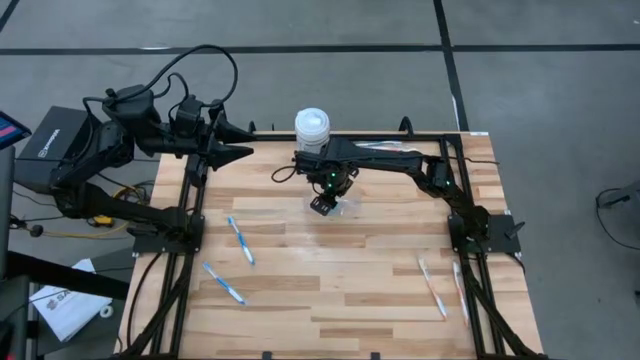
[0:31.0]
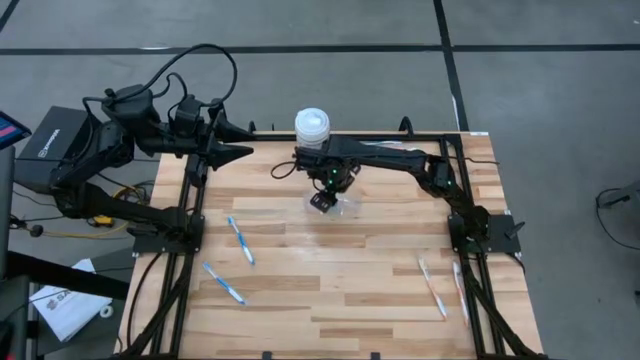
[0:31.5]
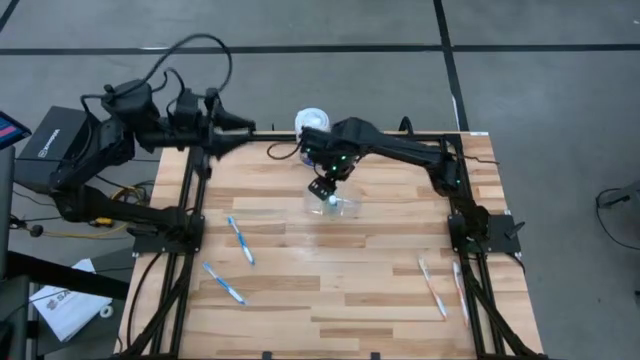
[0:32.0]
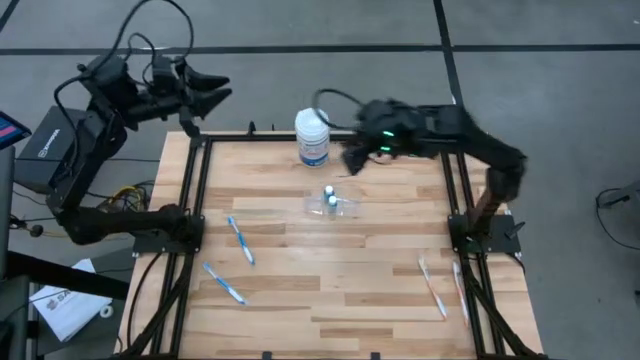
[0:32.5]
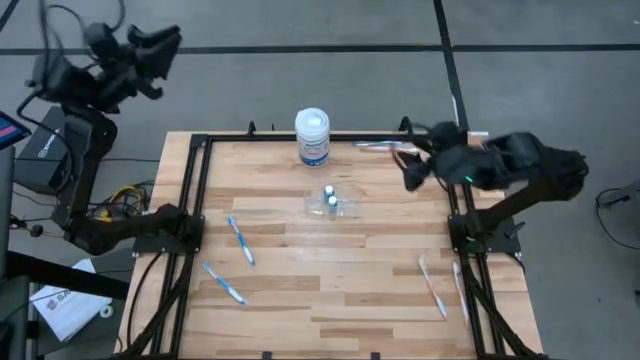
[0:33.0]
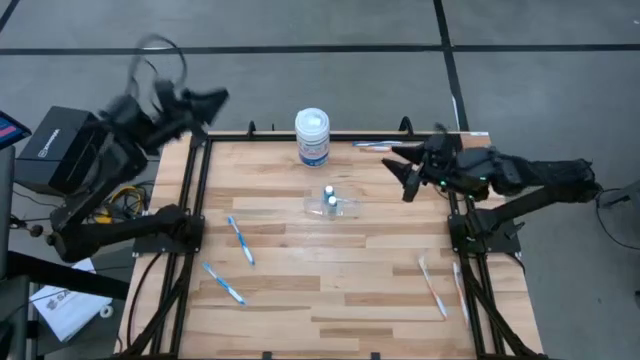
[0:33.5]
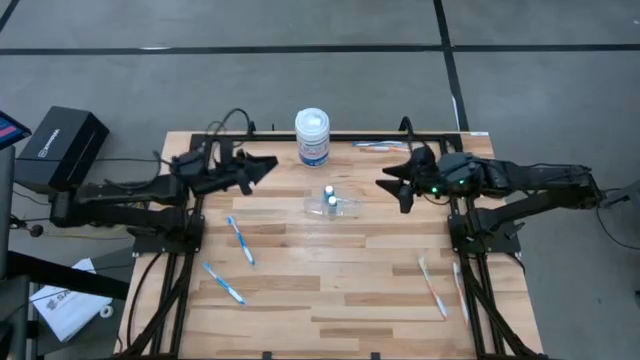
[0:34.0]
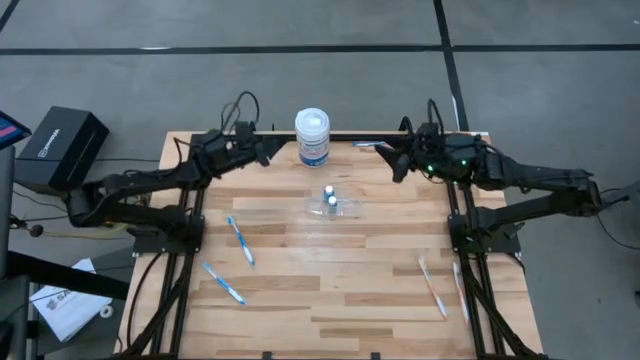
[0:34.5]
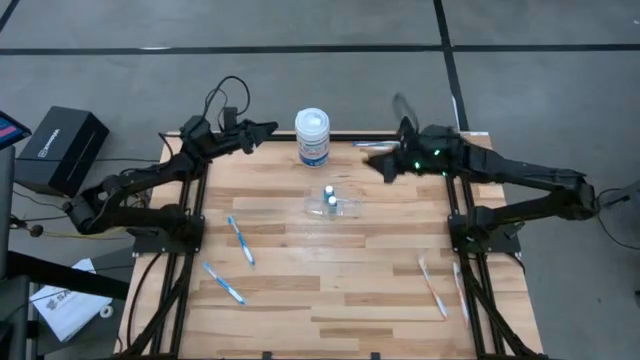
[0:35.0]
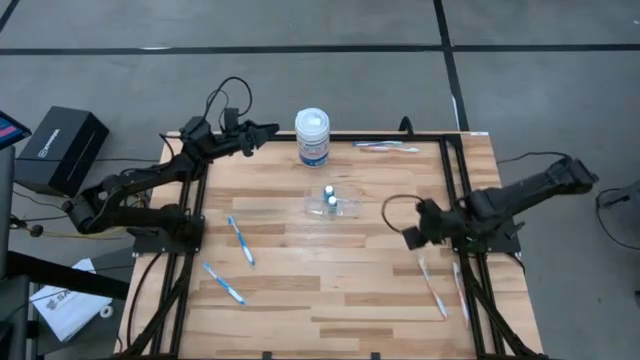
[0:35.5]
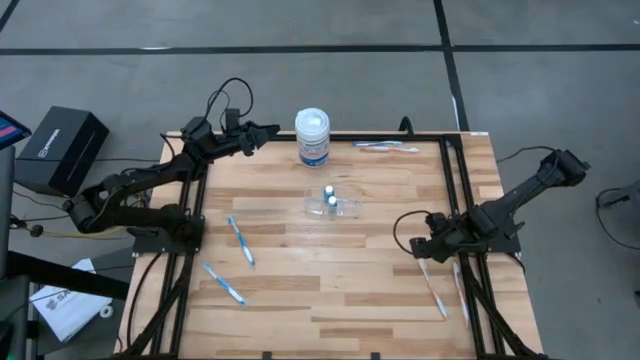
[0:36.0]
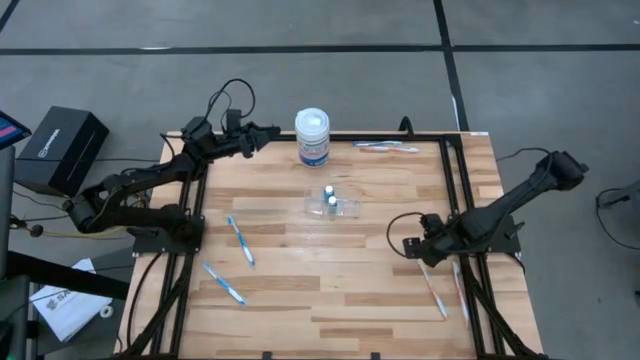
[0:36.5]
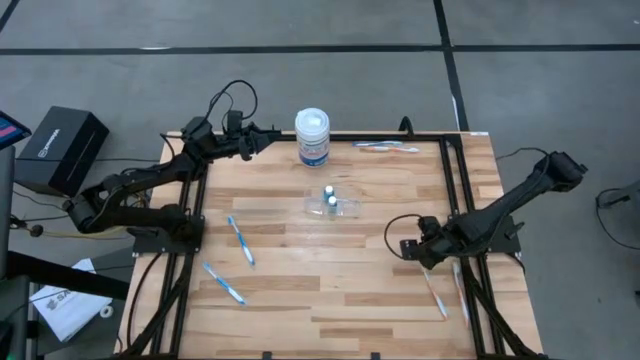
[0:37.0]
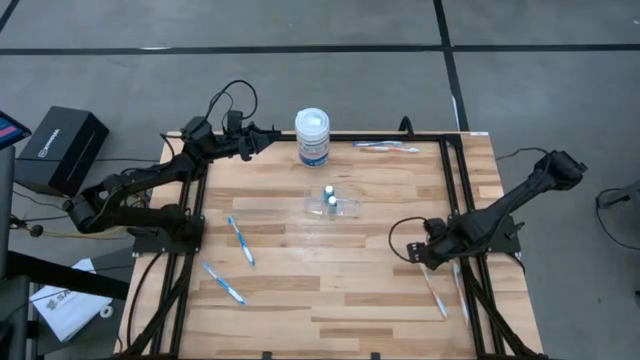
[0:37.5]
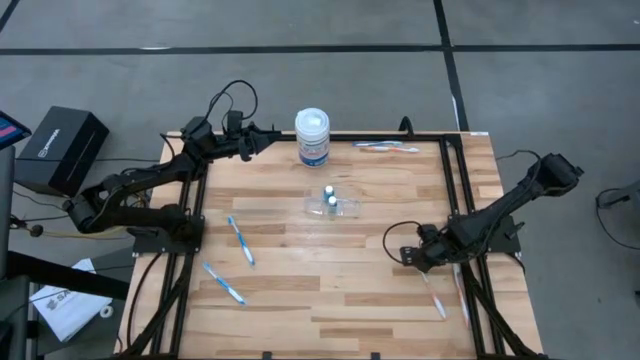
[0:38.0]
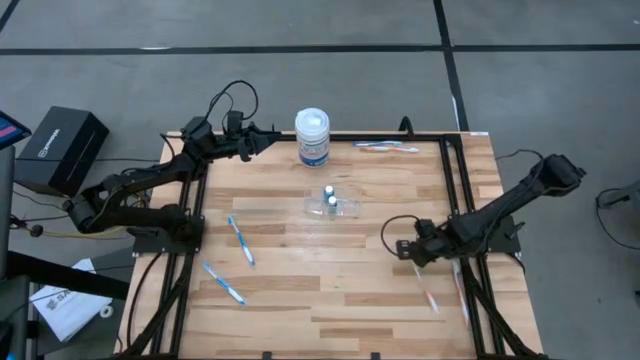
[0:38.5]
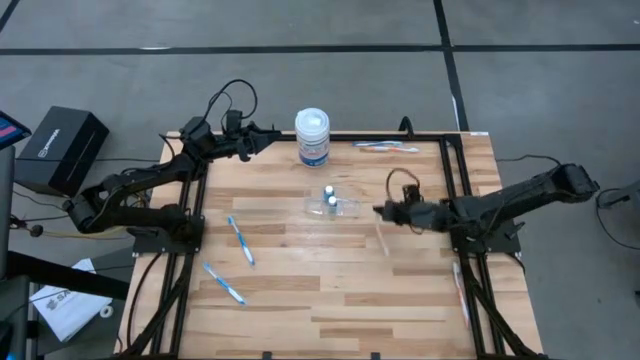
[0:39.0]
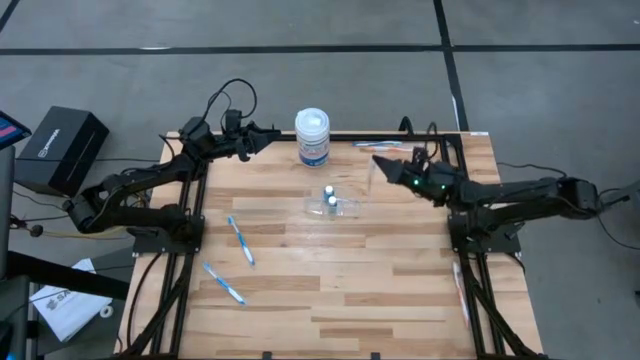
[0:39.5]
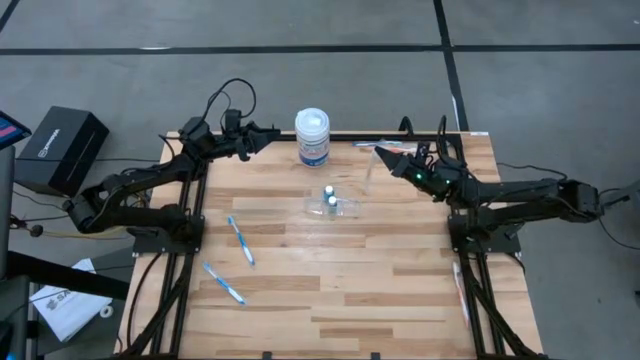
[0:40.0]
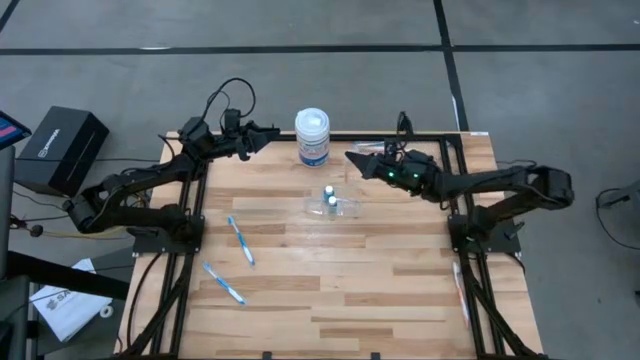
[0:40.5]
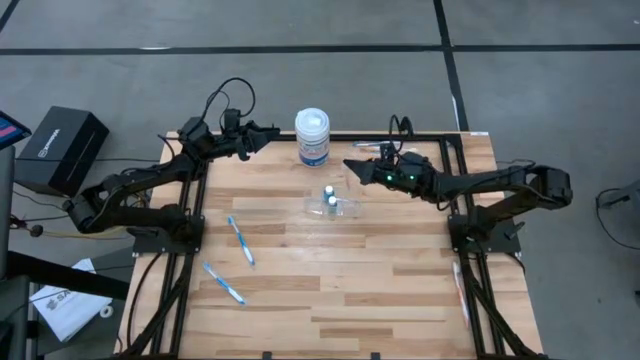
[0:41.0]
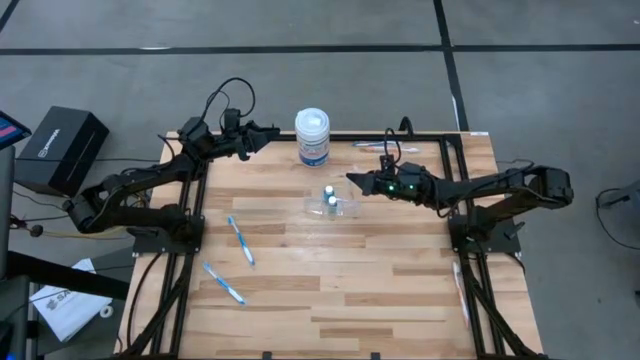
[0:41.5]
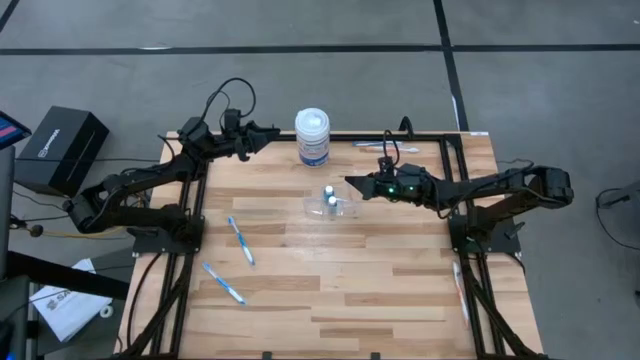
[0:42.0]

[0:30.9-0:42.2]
Task: Pick & Place toothbrushing station
Put the bottom left orange toothbrush into the transparent organizer

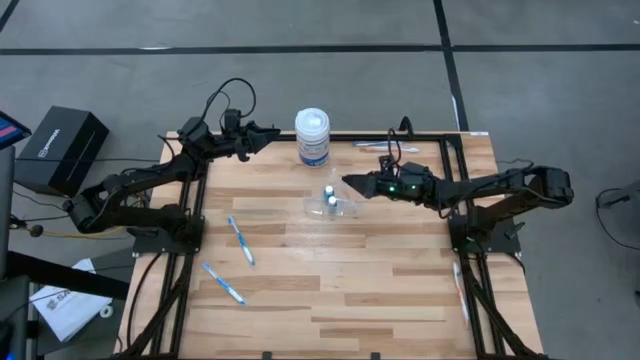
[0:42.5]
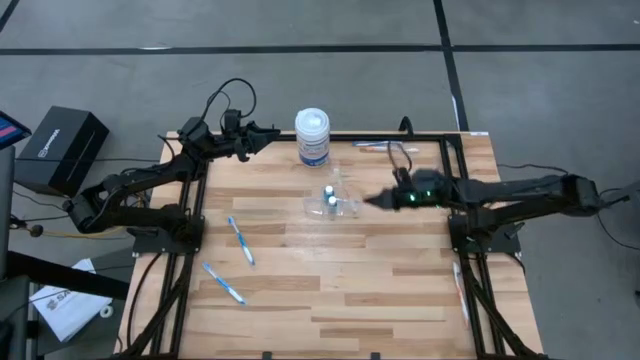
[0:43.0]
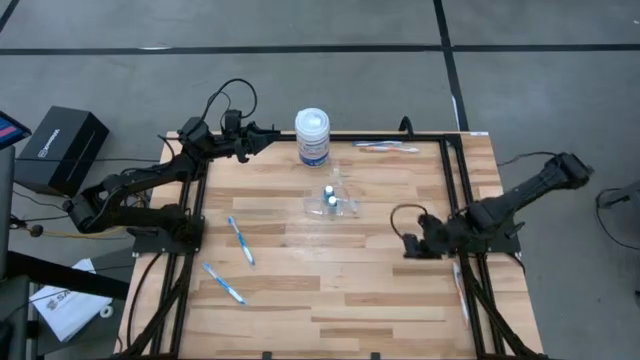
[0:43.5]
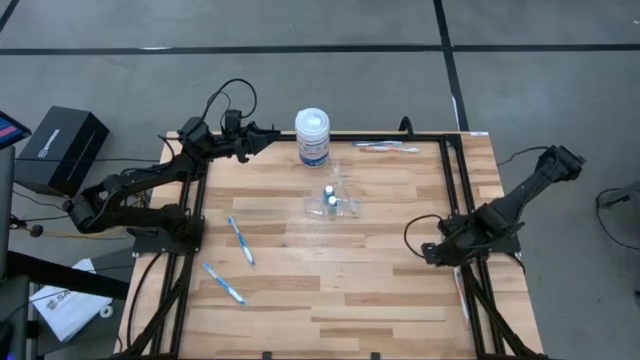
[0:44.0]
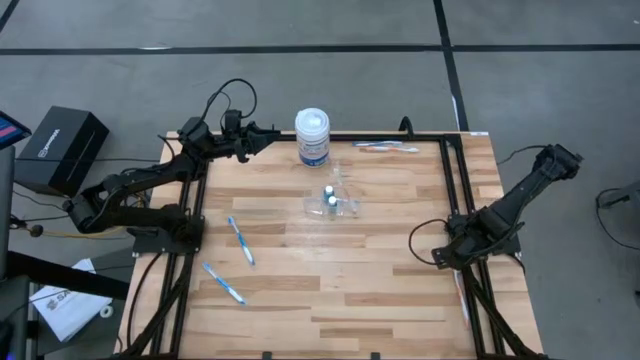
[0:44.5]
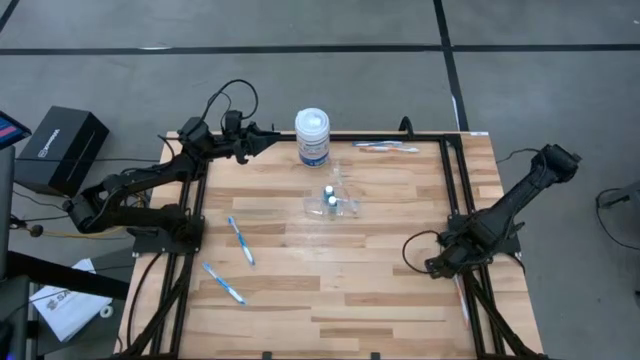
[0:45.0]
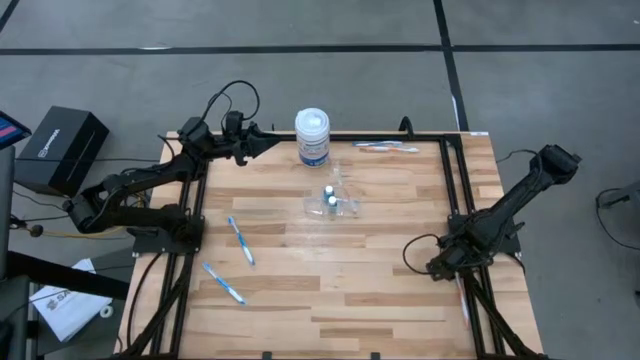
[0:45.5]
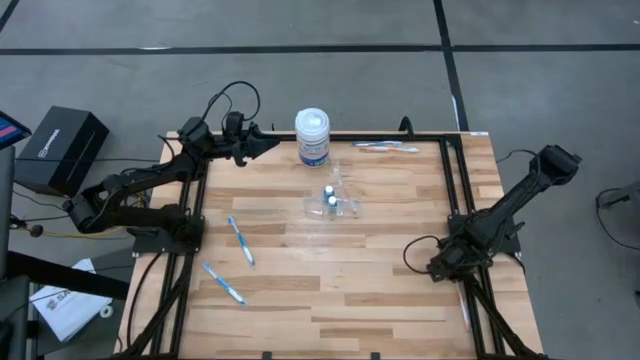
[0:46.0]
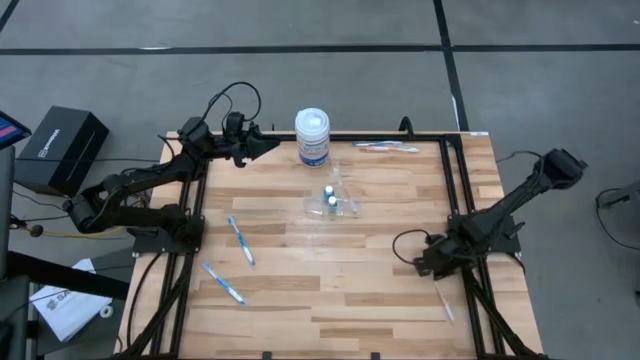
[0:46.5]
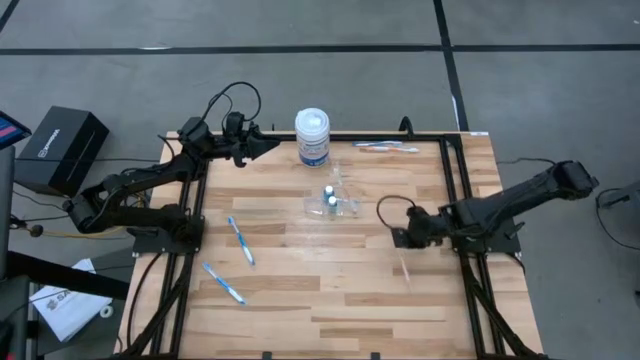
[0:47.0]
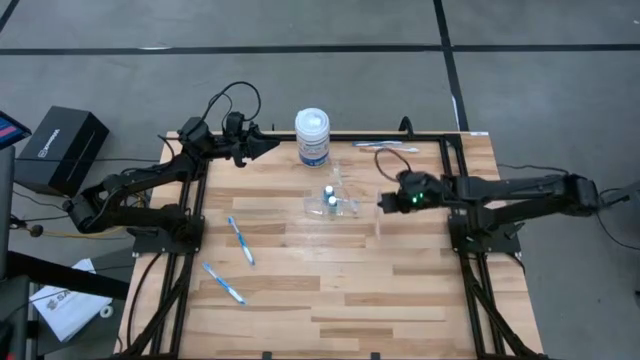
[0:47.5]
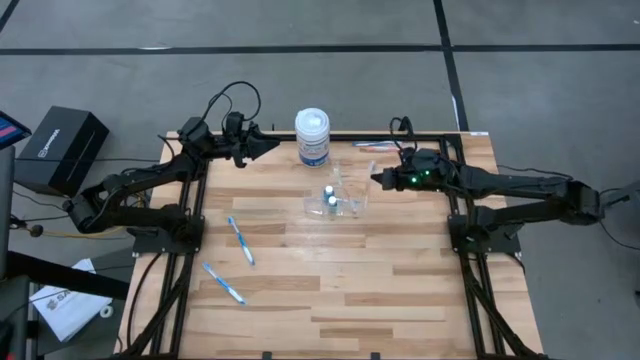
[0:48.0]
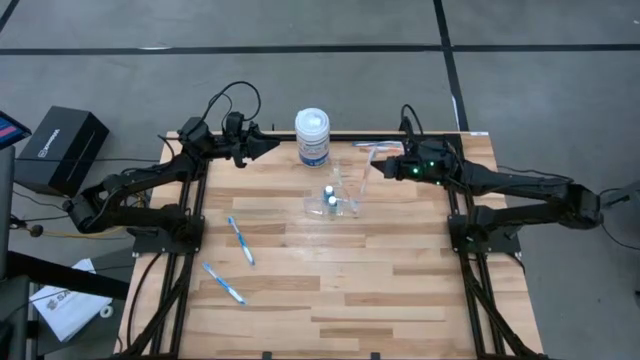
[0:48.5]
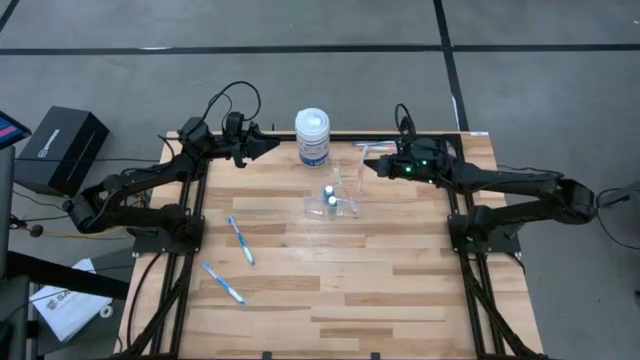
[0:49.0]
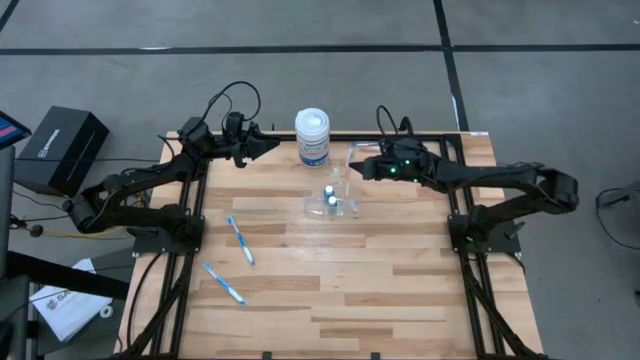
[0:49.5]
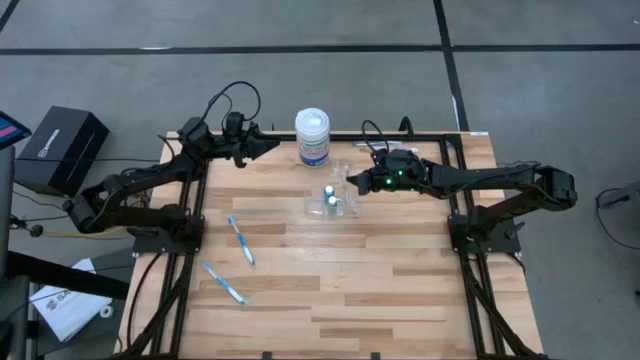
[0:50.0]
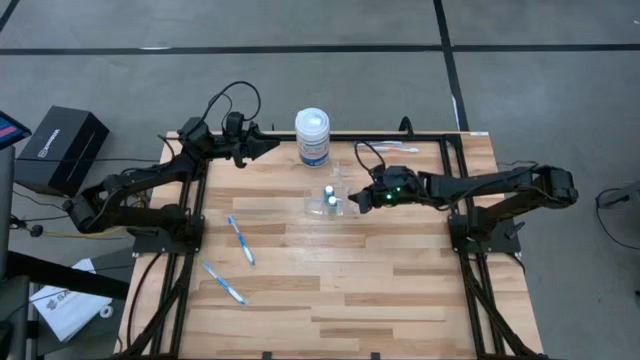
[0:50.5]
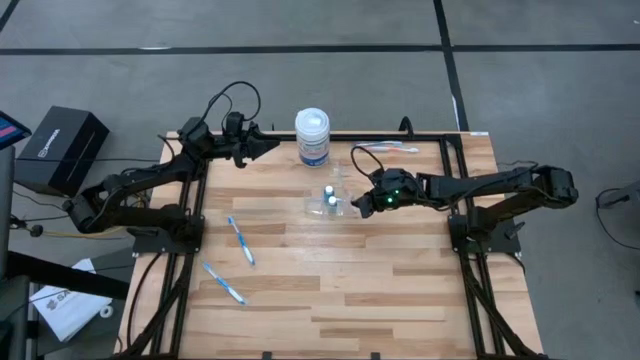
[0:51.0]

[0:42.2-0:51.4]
Put the bottom orange toothbrush into the transparent organizer

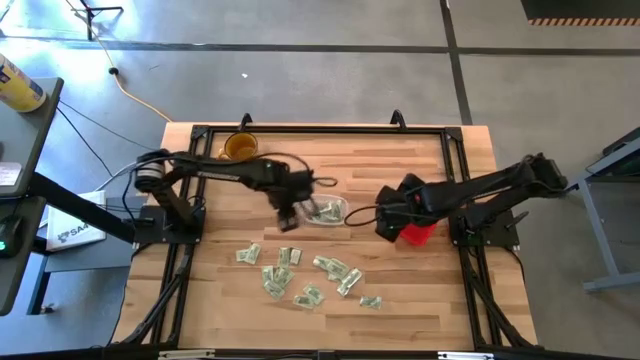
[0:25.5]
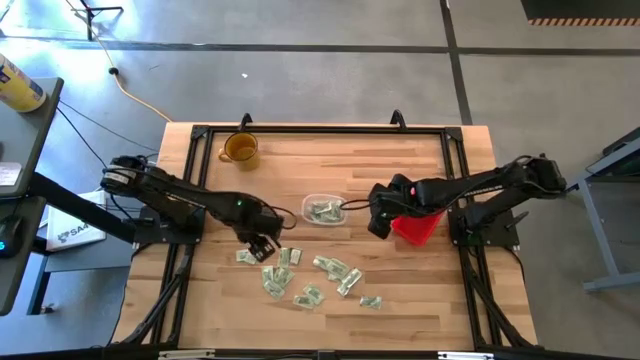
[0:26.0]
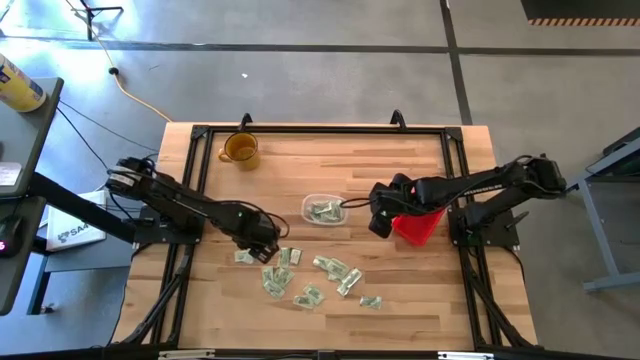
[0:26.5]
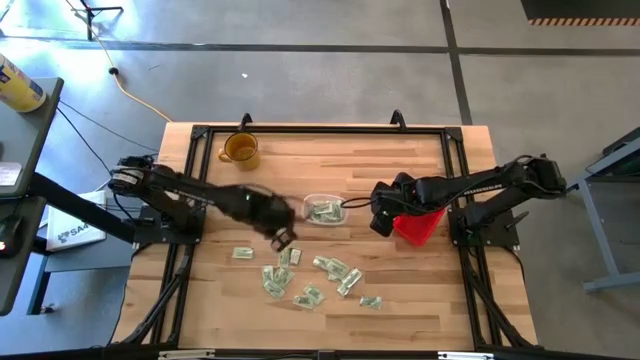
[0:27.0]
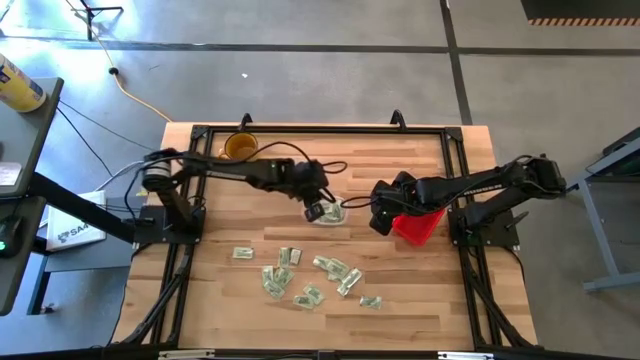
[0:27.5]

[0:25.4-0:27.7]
Task: Pick and place items into bin
Put the white stevia packet into the transparent bin
